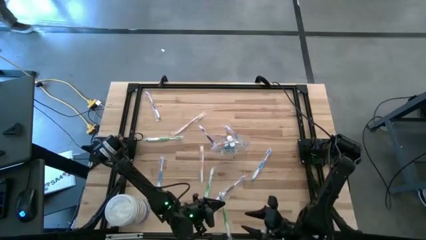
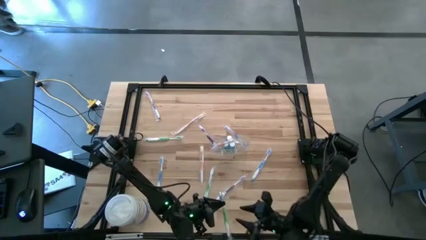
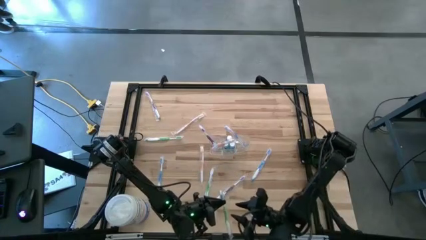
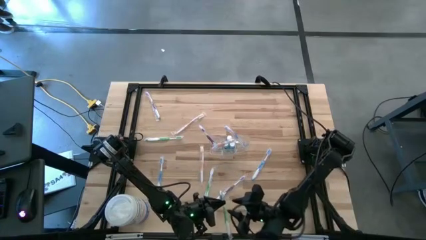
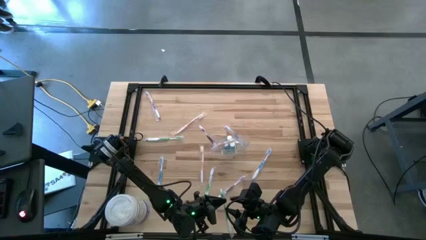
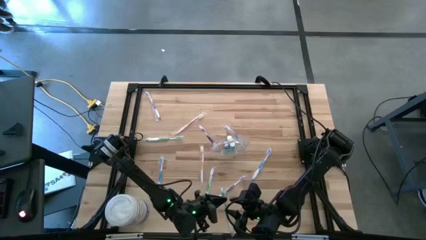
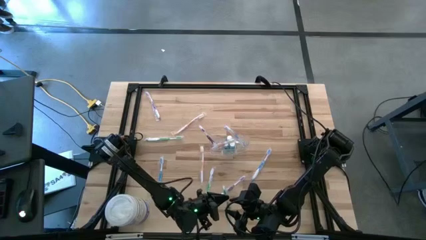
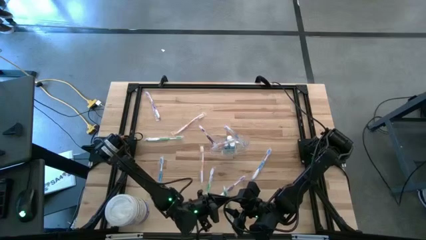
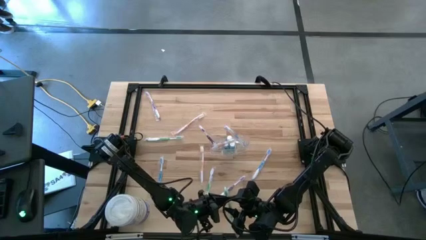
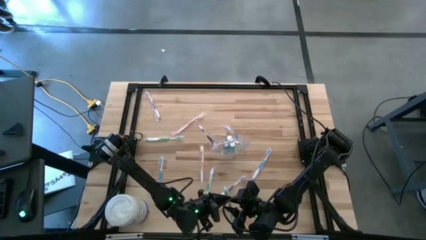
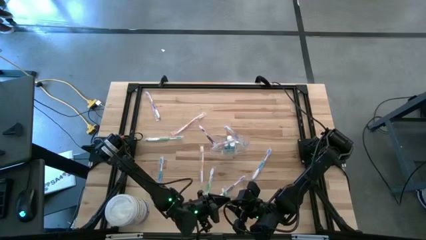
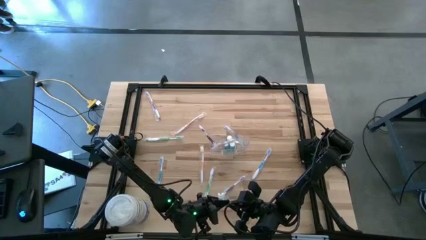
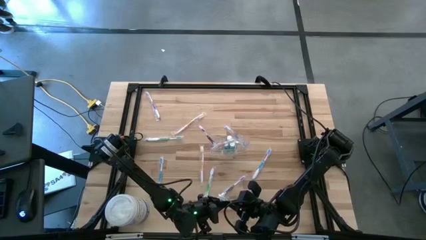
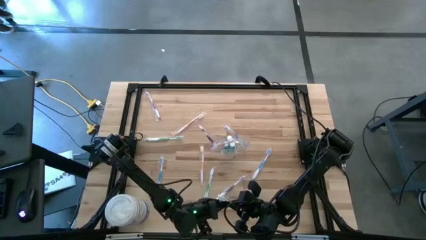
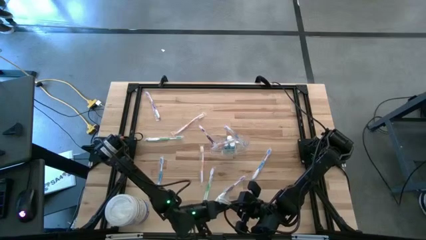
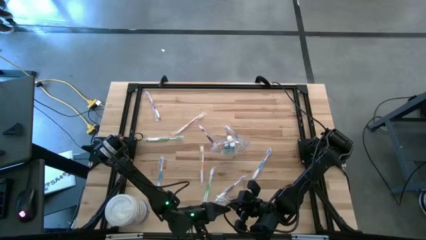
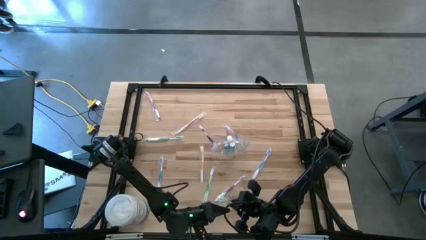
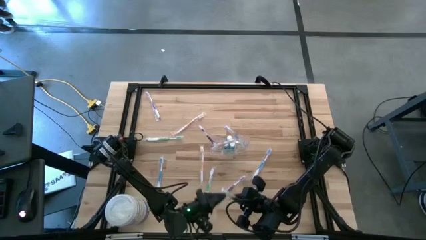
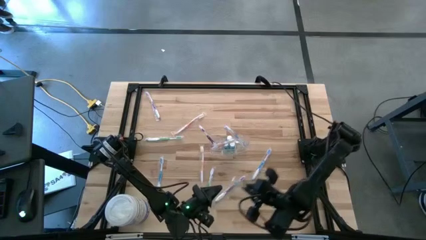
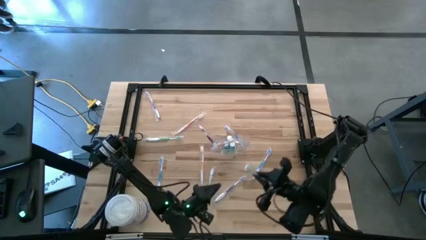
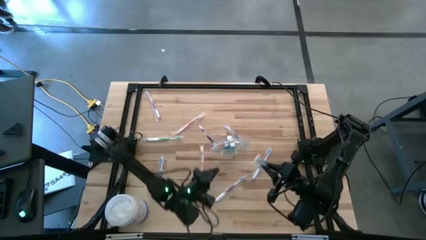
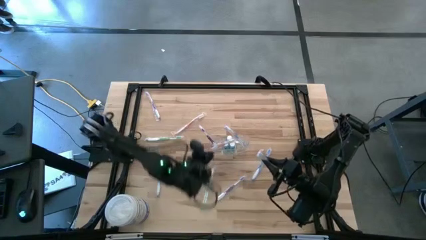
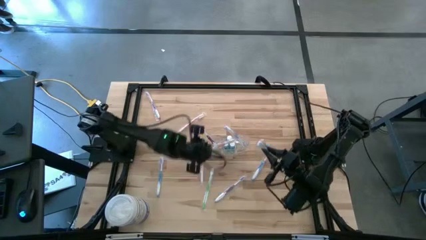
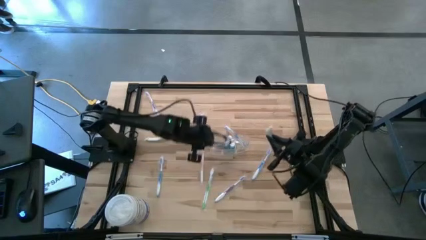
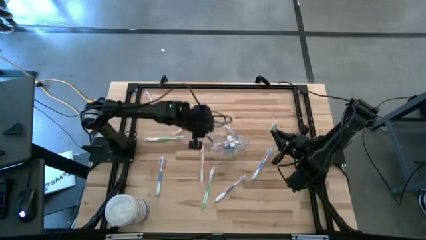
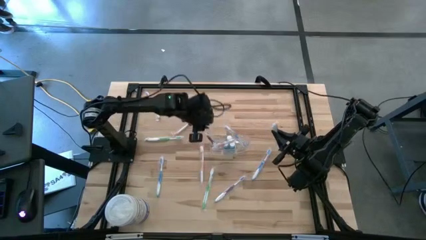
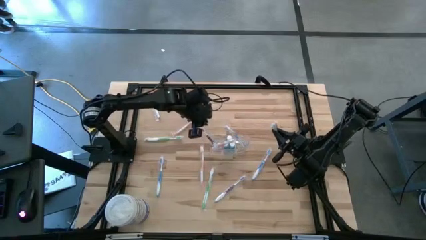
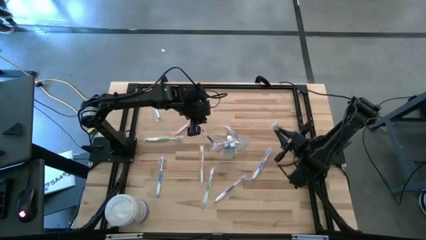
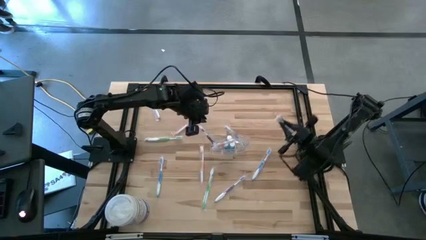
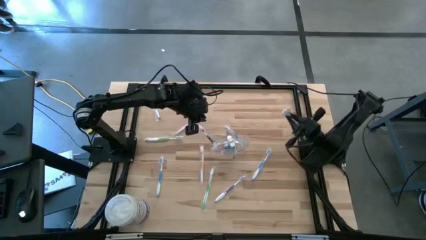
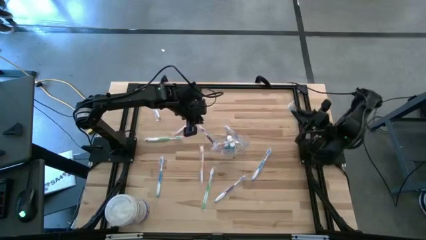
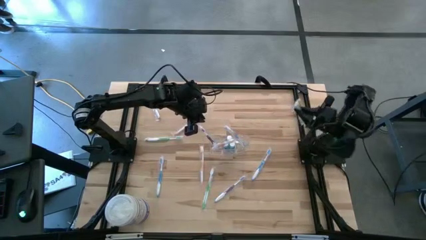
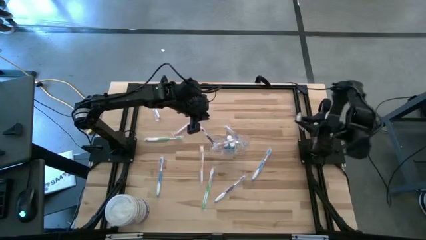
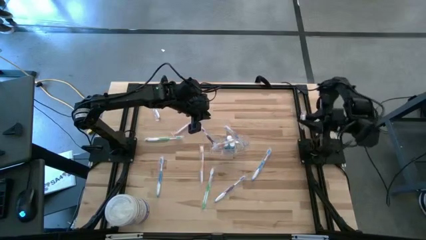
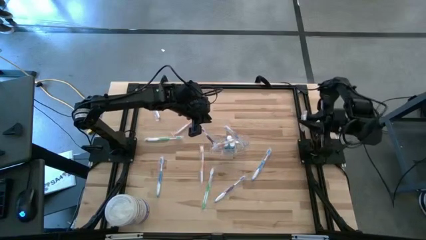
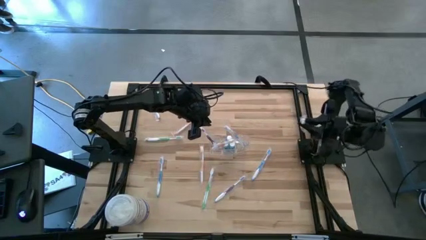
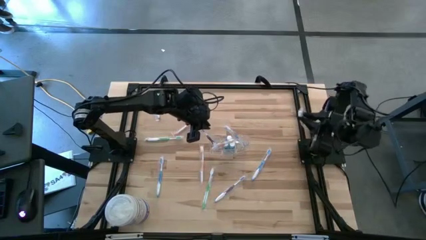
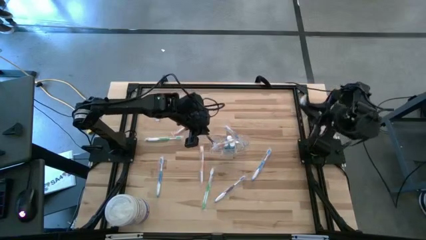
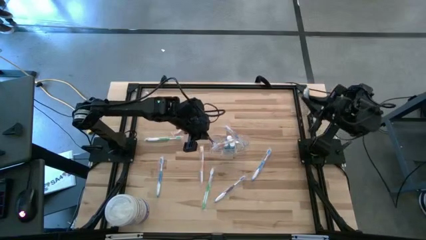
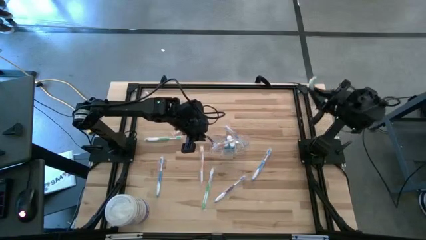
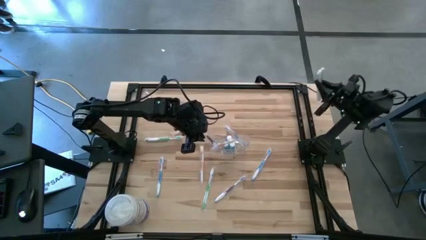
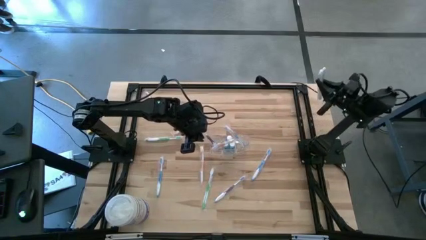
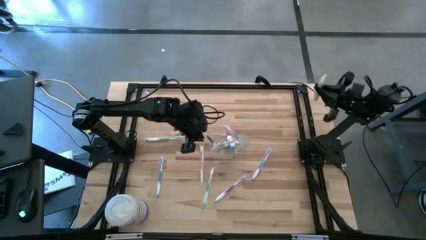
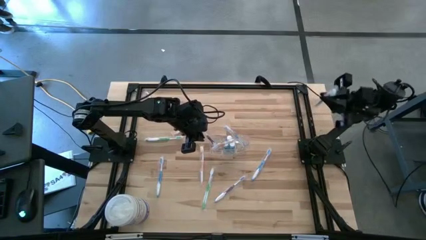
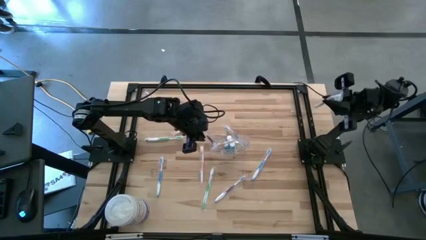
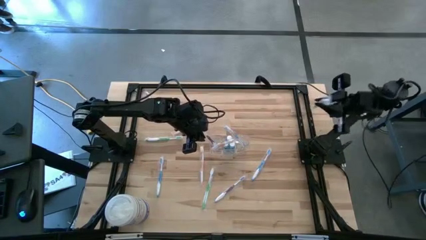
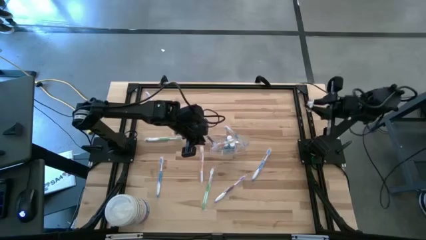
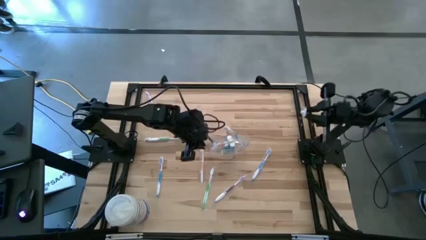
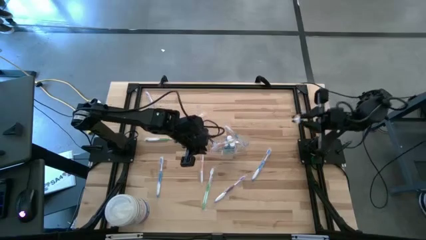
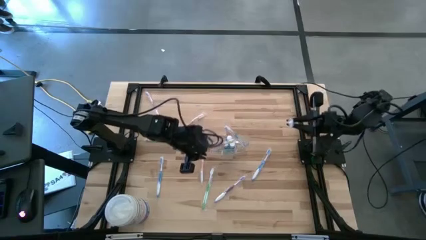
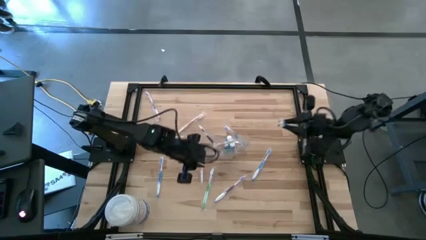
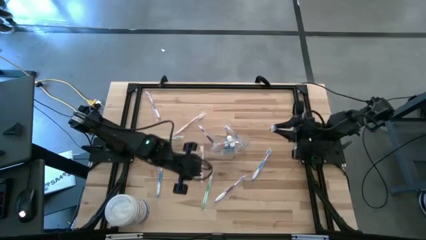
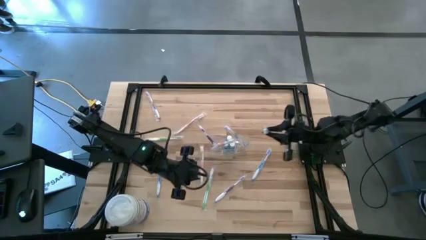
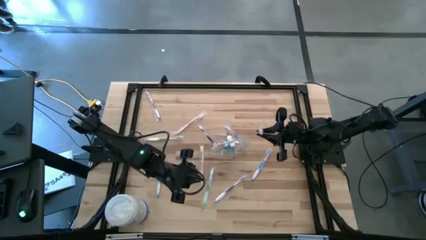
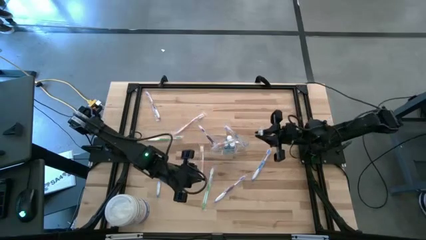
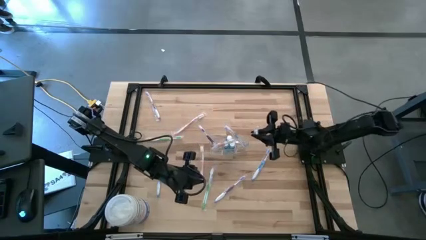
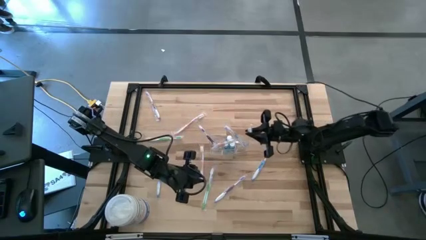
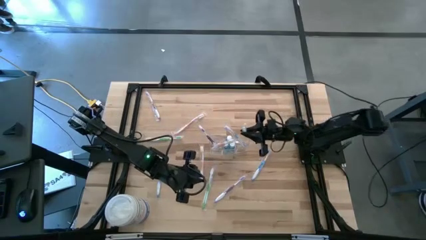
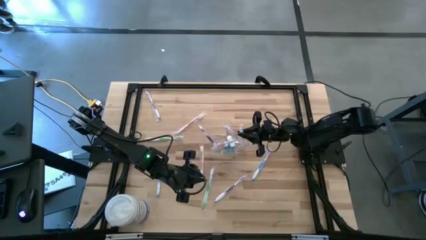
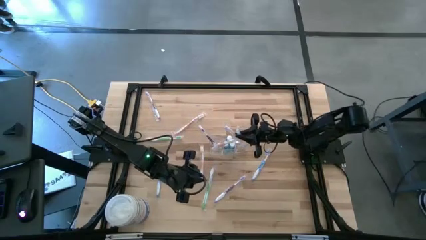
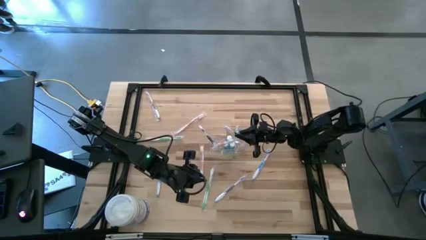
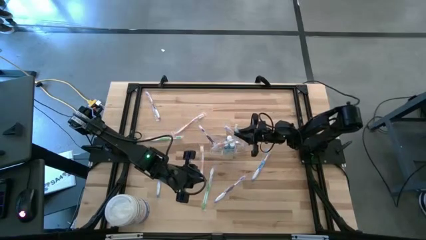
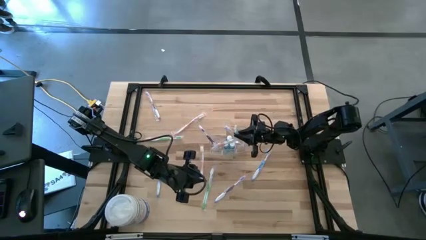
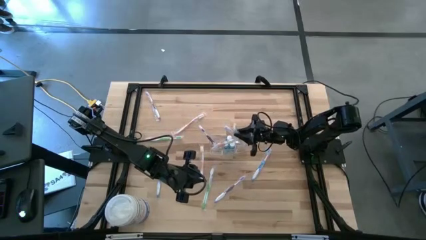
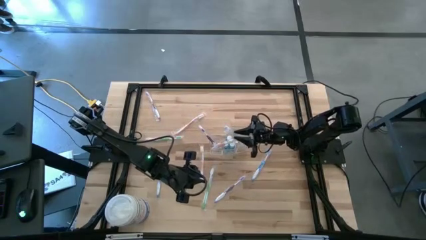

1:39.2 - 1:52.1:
Task: Pick & Place toothbrushing station
Put the bottom right green toothbrush into the wire organizer
